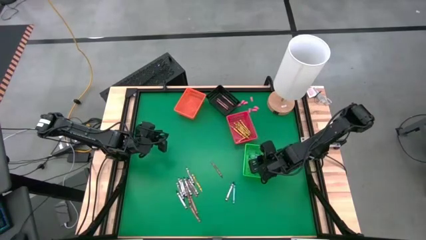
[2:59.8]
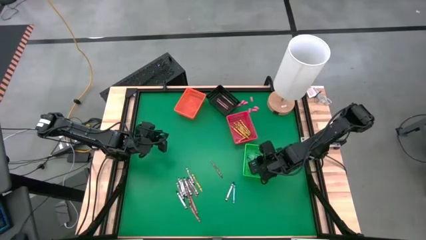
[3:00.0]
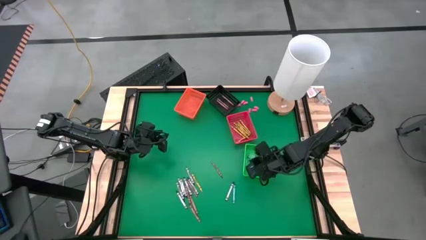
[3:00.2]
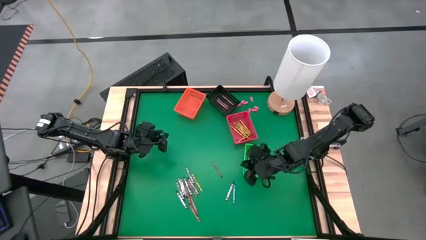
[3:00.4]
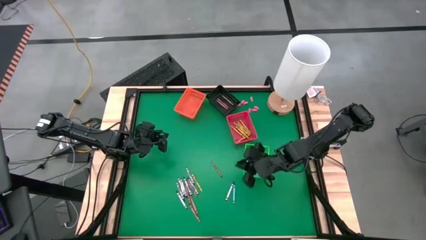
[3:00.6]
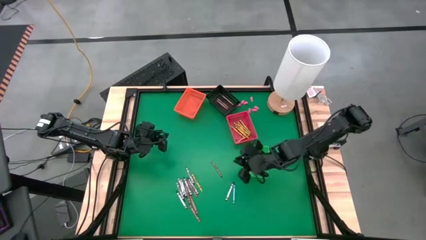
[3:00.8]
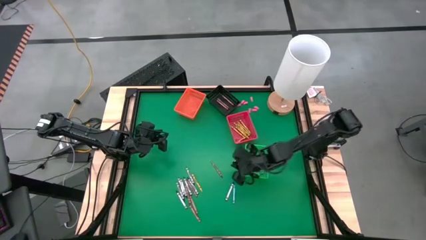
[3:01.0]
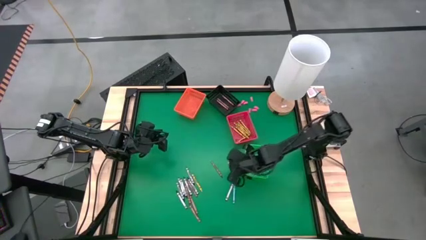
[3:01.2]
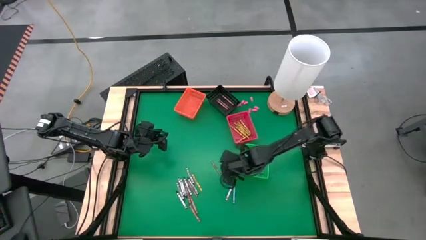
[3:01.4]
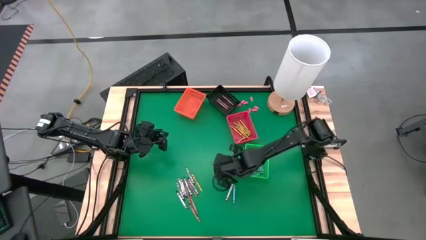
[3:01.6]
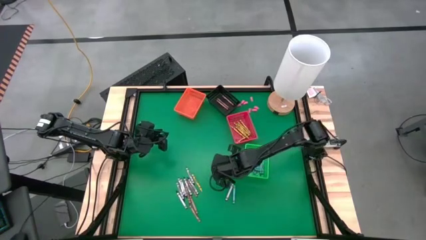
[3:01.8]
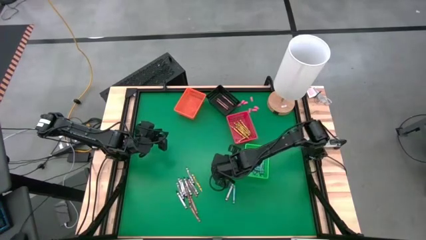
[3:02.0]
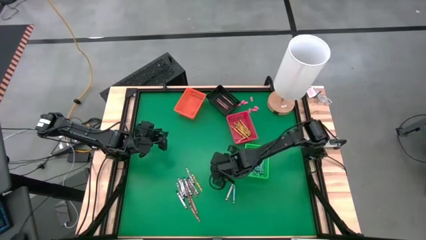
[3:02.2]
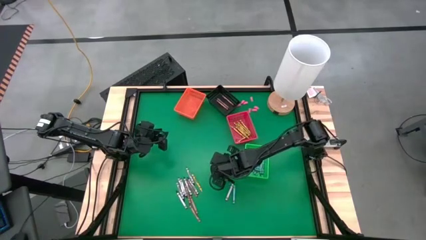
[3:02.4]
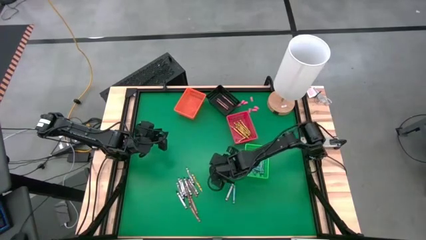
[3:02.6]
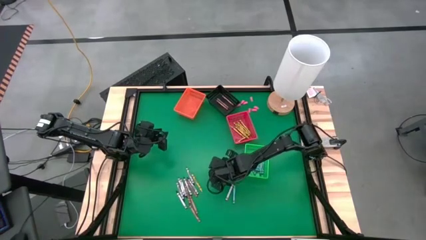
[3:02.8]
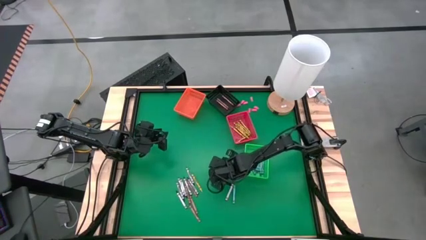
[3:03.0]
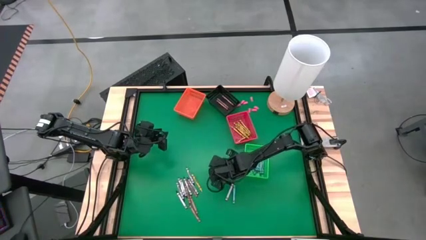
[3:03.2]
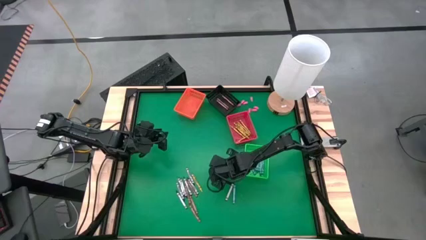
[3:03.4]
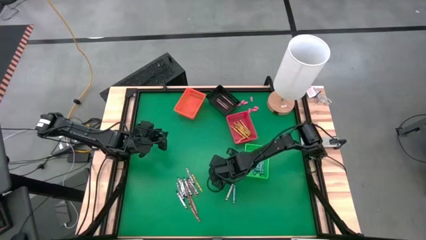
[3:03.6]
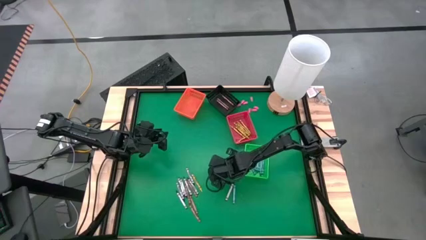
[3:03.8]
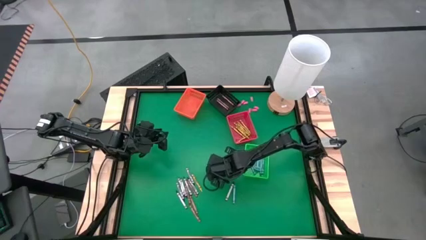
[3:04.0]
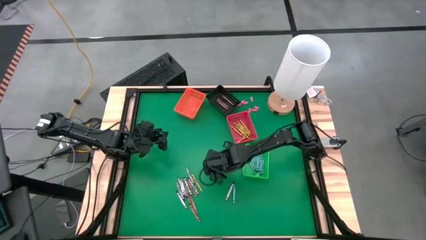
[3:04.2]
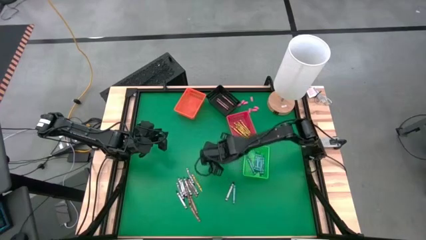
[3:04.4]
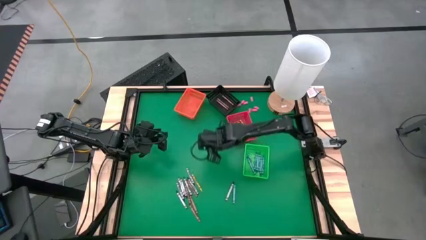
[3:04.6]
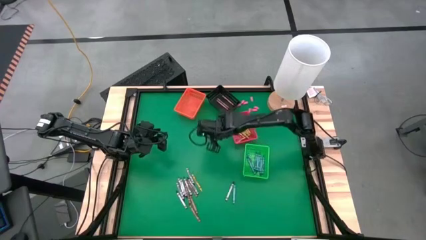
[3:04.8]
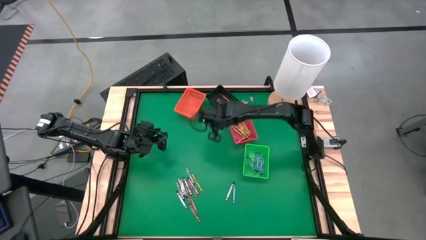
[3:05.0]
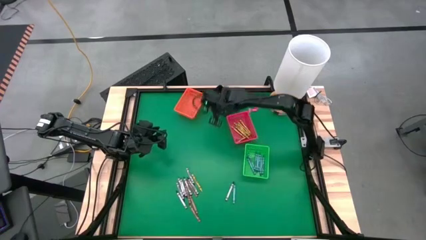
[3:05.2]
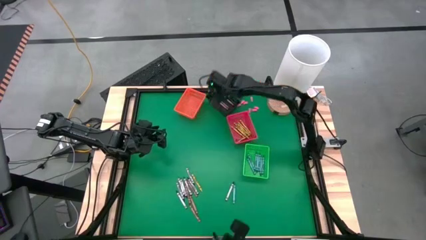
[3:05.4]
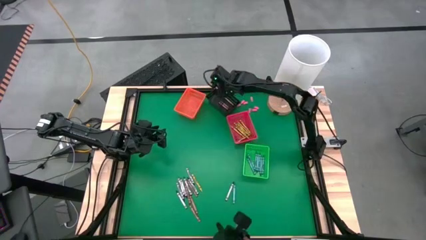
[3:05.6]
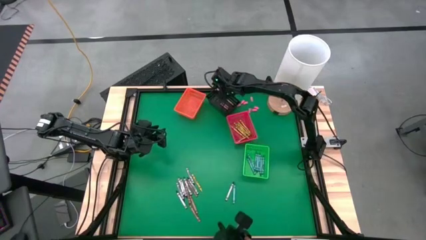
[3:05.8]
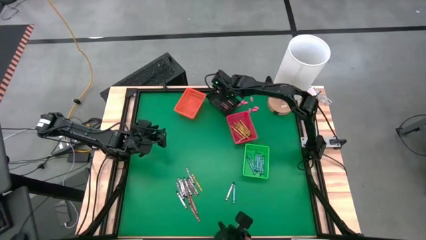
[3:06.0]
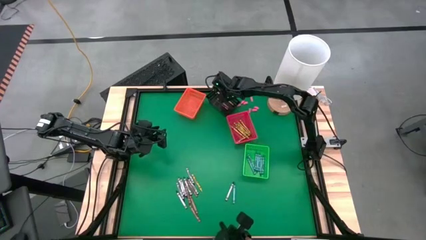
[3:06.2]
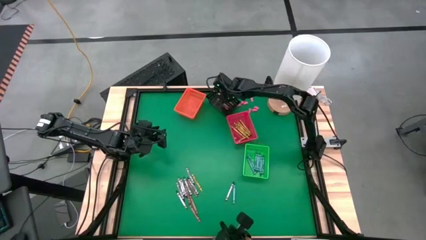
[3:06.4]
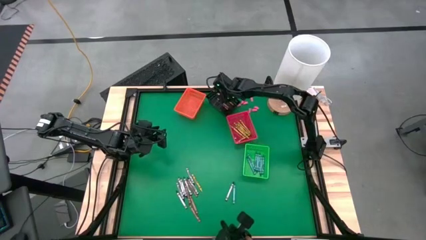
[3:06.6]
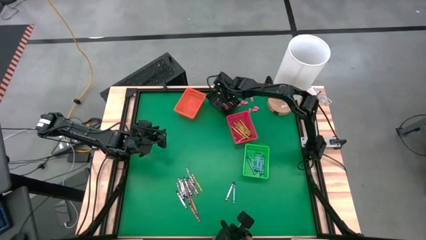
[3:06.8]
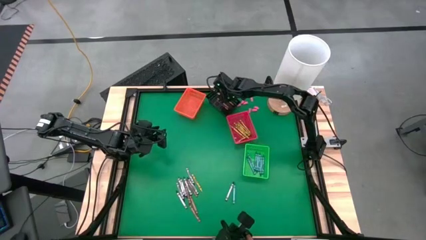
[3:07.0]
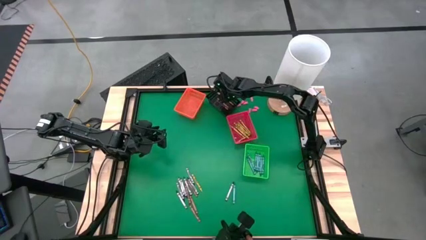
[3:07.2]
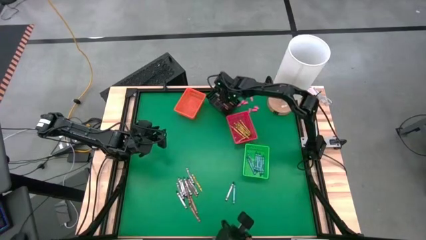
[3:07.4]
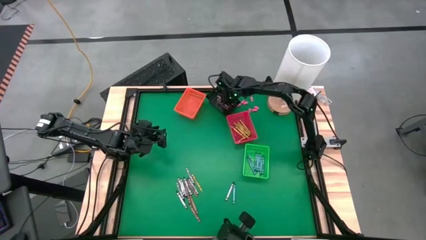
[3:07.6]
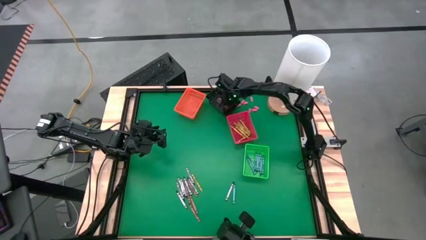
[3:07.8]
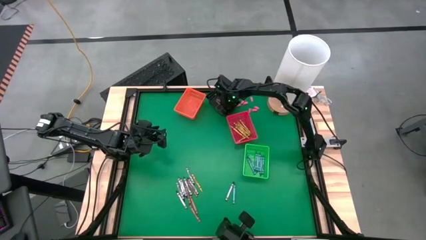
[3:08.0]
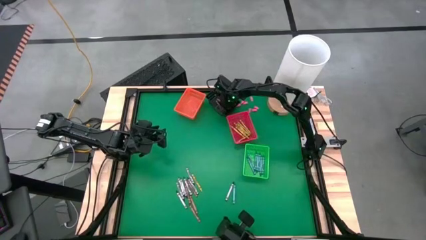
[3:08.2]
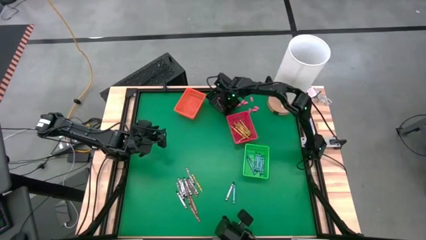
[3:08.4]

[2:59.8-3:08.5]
Task: Sort crayons
Put the brown crayon into the black bin

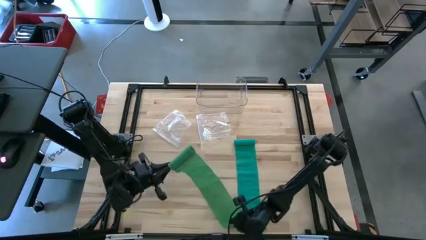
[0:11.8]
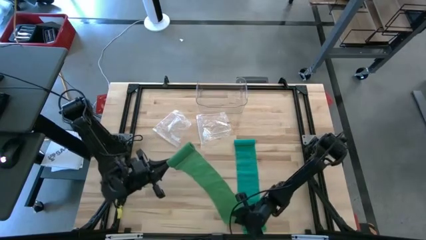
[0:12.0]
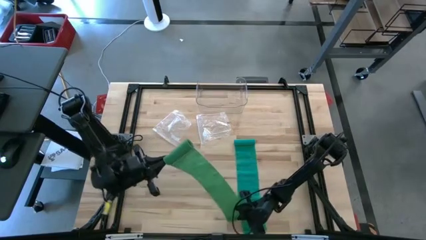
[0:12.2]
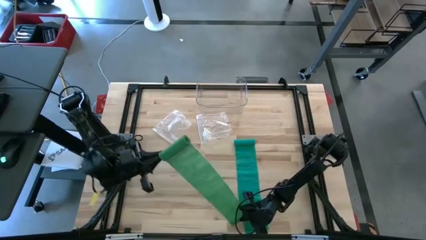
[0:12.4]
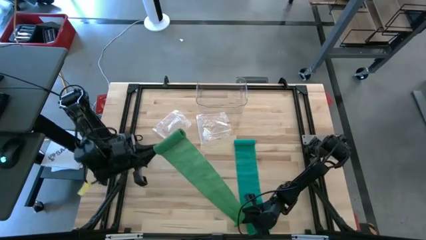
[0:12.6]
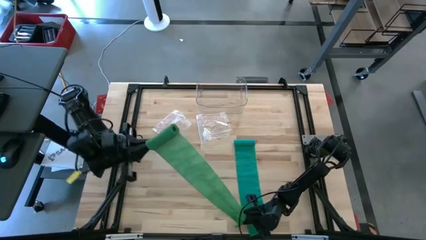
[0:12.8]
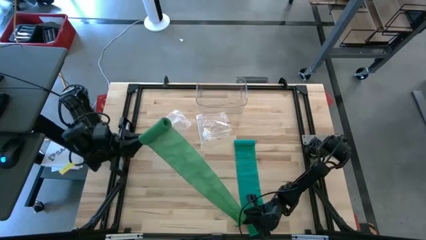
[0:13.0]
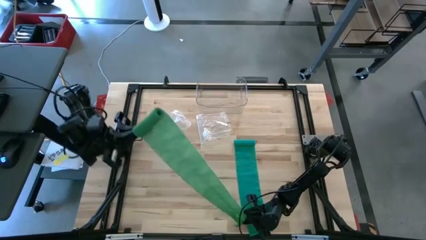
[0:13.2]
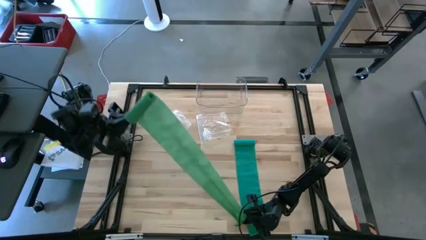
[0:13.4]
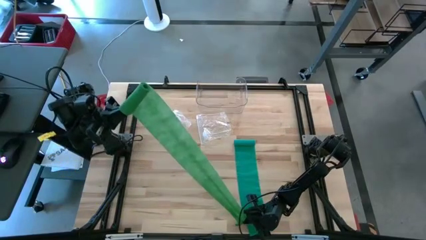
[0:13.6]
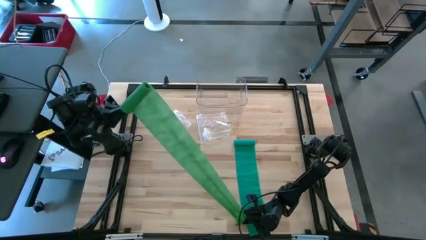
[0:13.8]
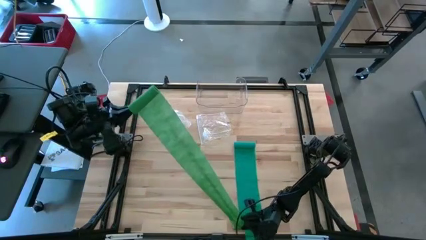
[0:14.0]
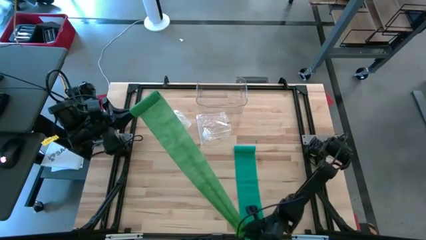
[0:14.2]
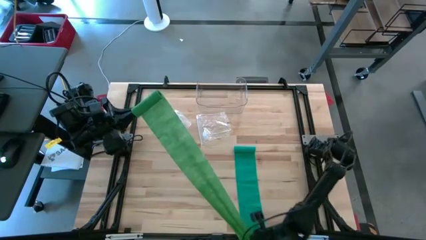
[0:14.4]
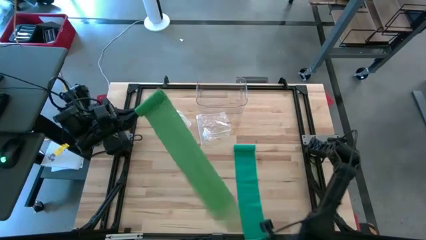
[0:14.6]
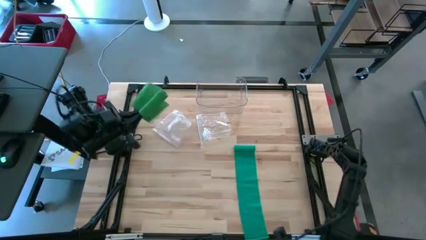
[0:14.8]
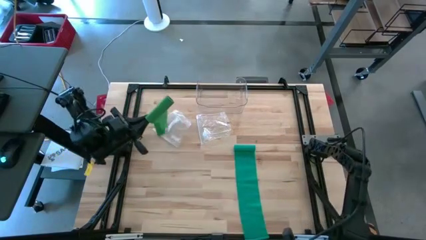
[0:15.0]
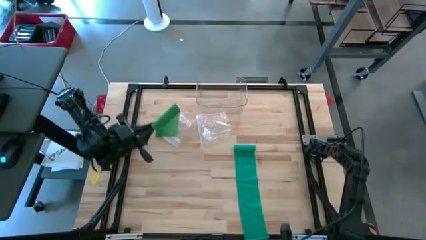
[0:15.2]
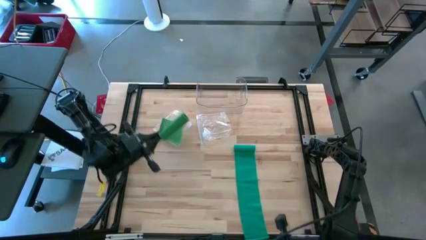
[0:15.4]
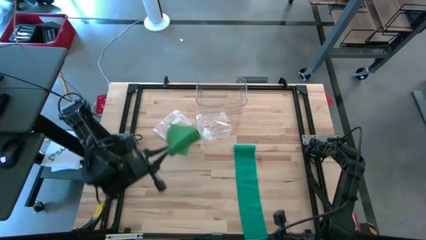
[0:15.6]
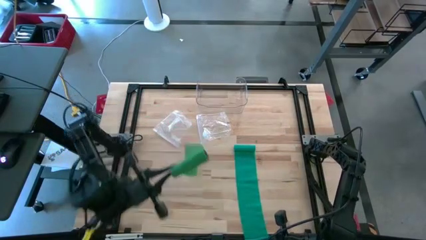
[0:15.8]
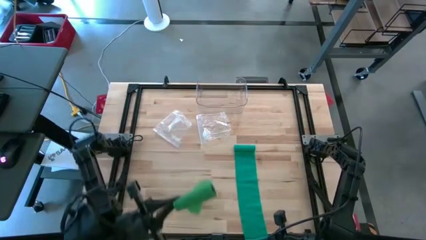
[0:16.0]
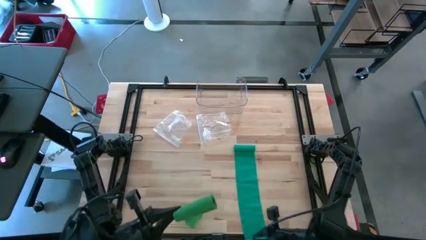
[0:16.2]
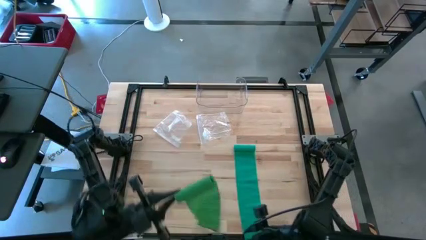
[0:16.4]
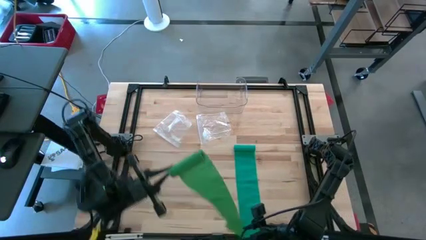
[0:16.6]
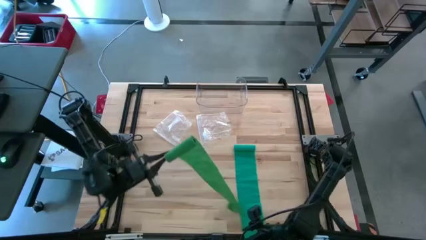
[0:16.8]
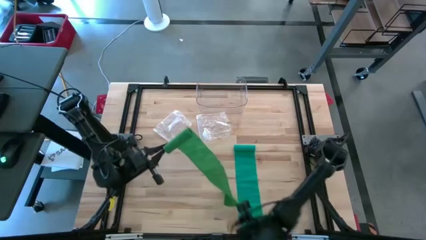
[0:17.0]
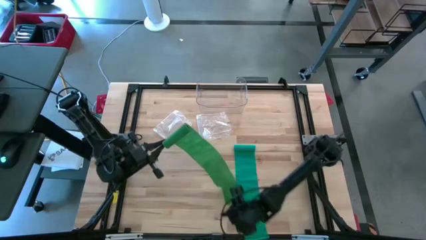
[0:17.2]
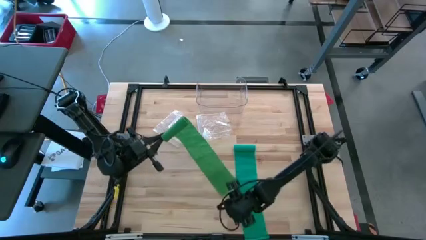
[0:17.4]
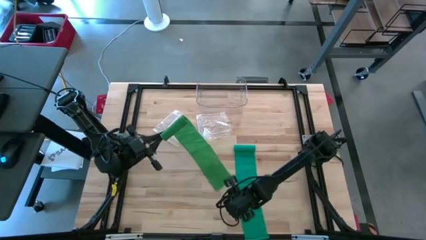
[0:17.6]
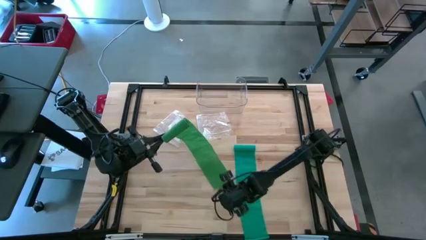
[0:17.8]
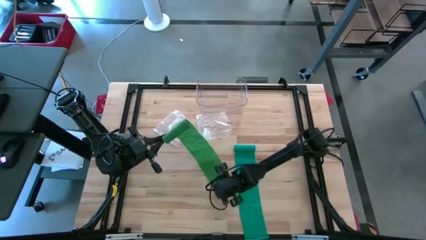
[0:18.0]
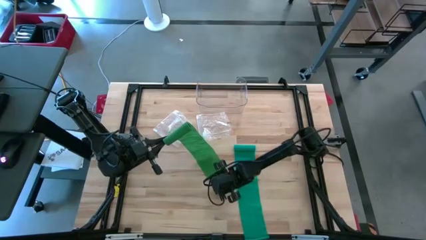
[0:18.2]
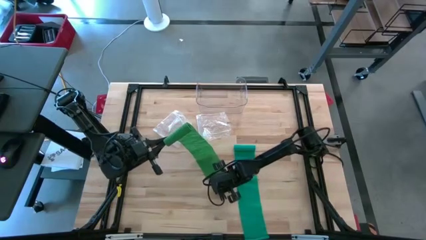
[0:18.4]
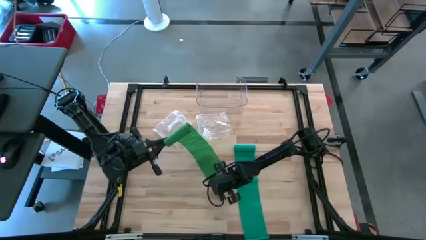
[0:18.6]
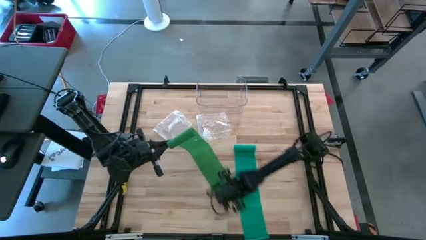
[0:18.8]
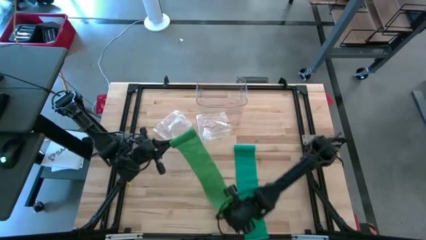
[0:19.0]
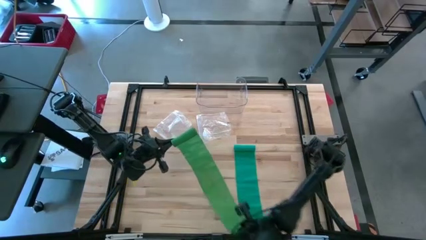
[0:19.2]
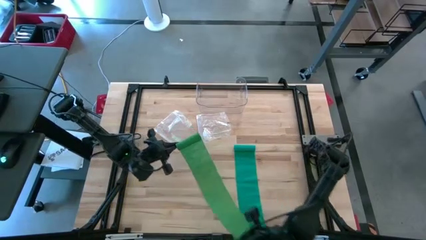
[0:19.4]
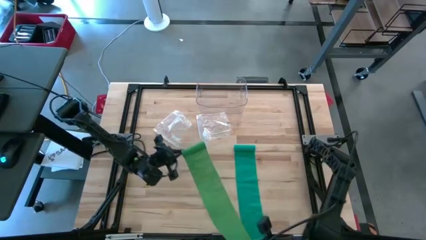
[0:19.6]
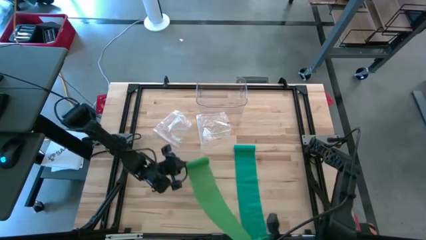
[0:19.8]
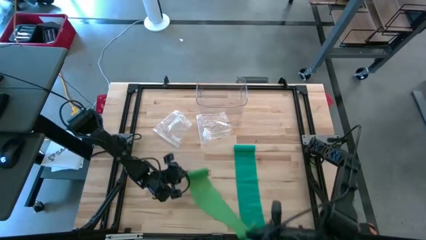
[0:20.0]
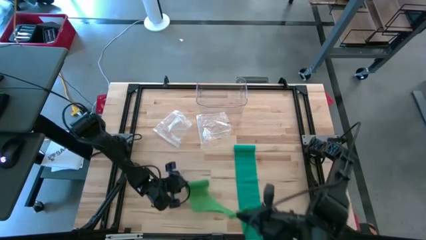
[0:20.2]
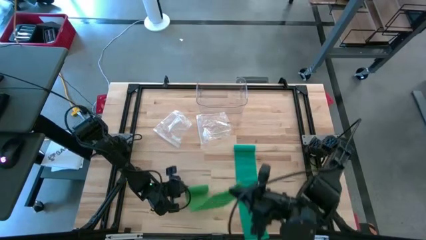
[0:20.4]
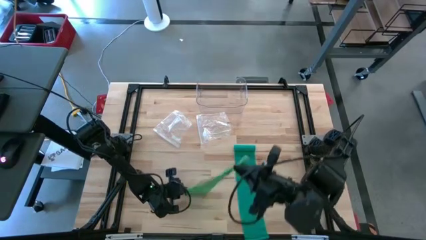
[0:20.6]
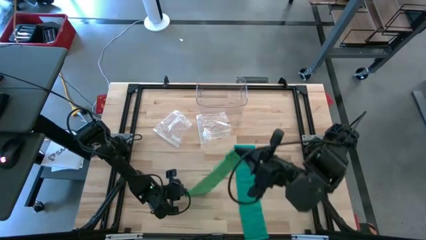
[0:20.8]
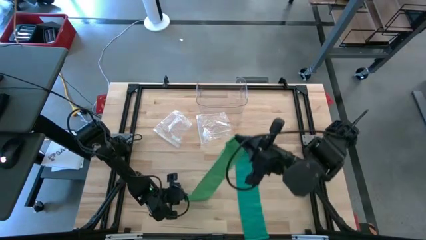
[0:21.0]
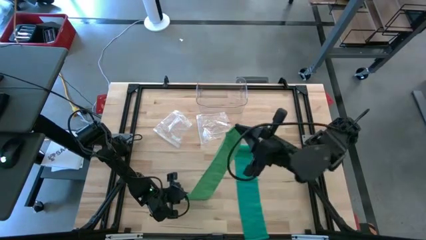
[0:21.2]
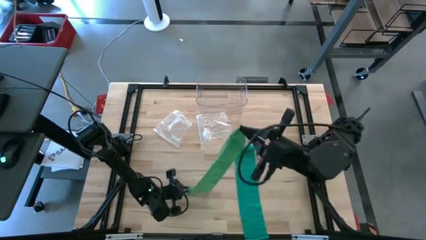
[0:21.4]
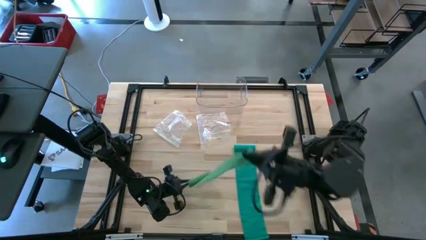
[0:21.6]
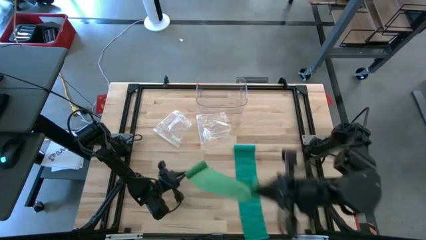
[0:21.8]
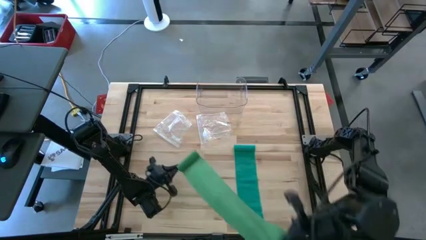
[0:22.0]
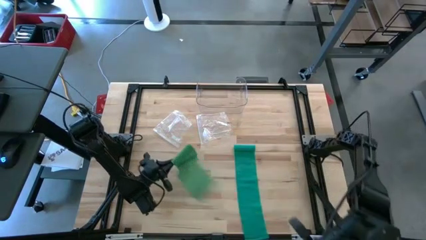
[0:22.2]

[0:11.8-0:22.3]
Task: Roll bandage
Roll the green bandage on the table
